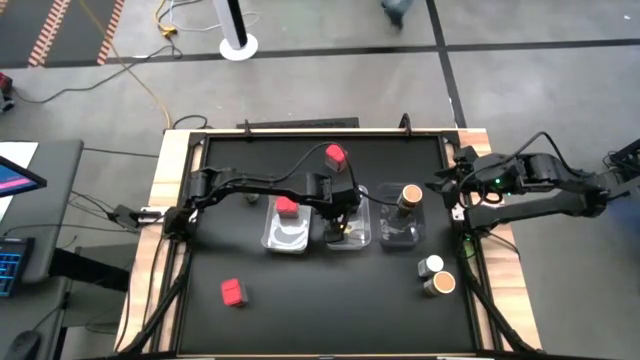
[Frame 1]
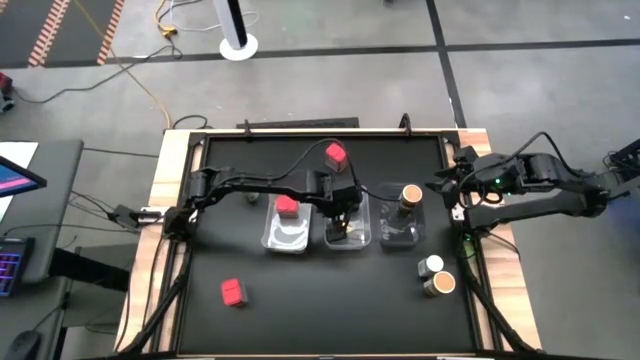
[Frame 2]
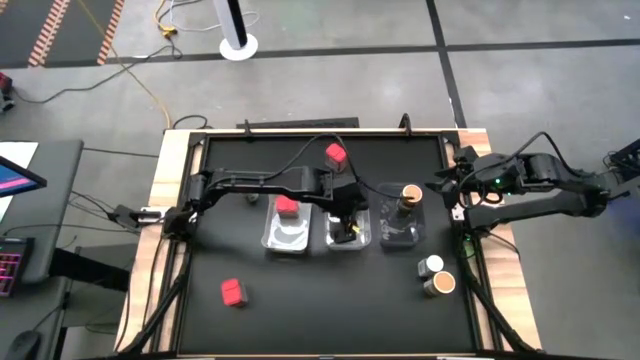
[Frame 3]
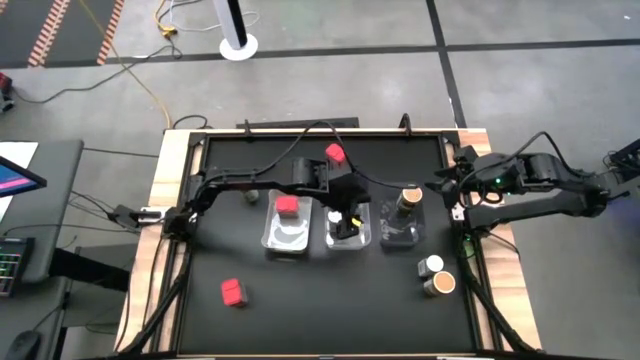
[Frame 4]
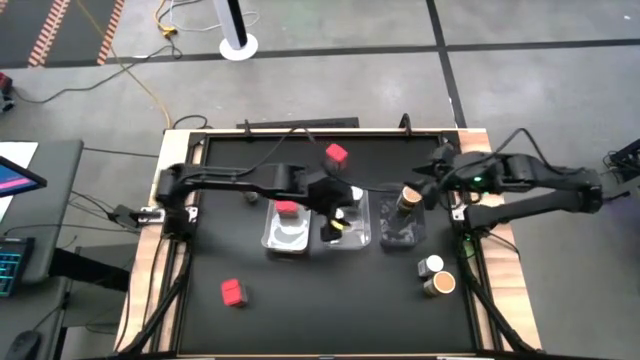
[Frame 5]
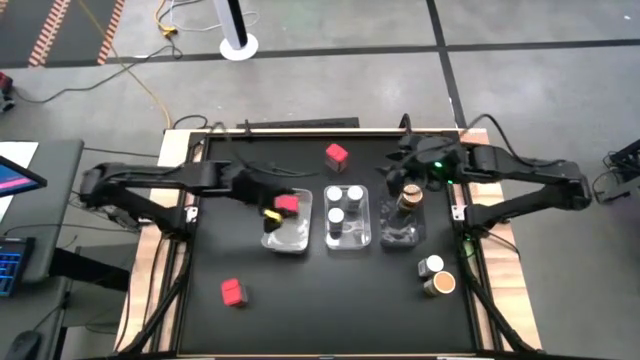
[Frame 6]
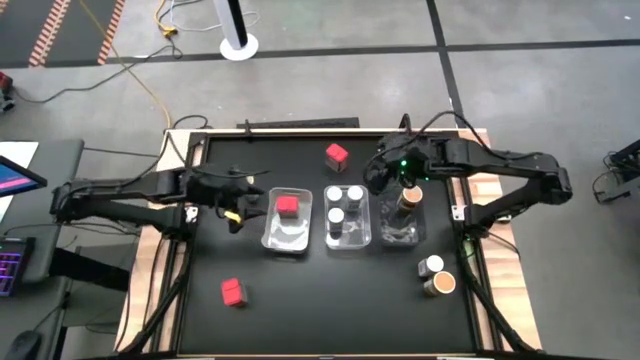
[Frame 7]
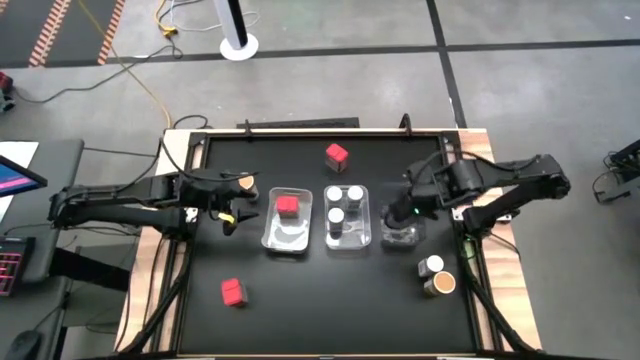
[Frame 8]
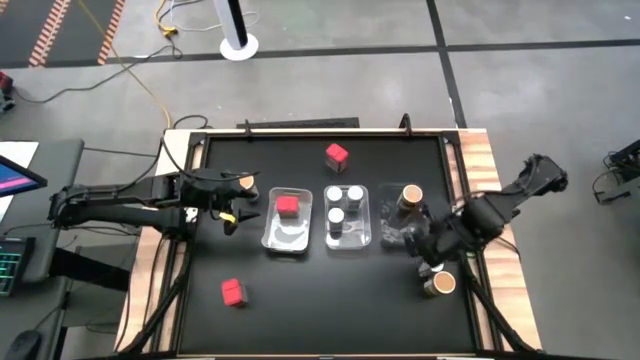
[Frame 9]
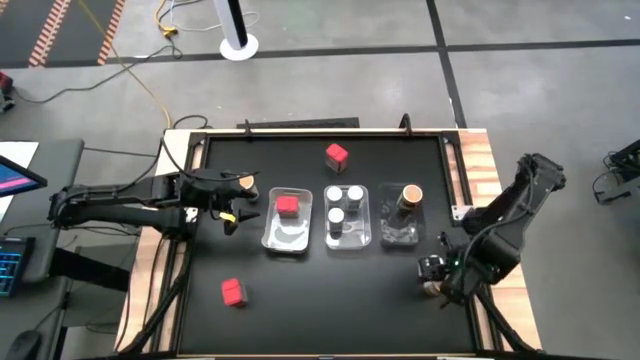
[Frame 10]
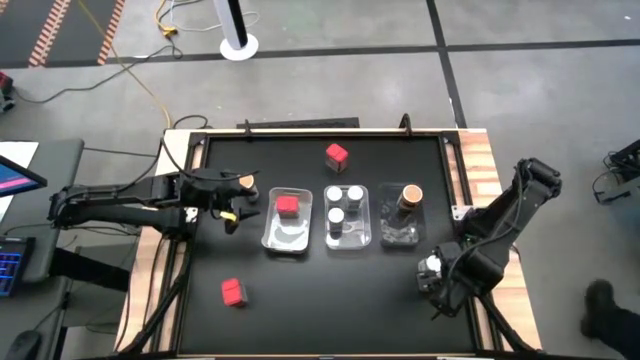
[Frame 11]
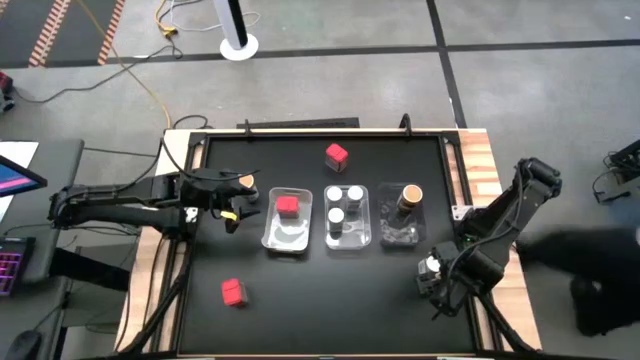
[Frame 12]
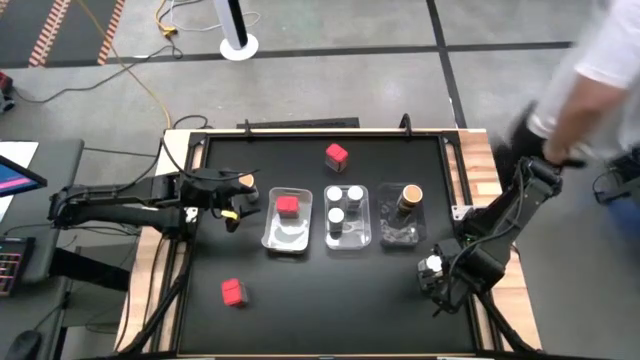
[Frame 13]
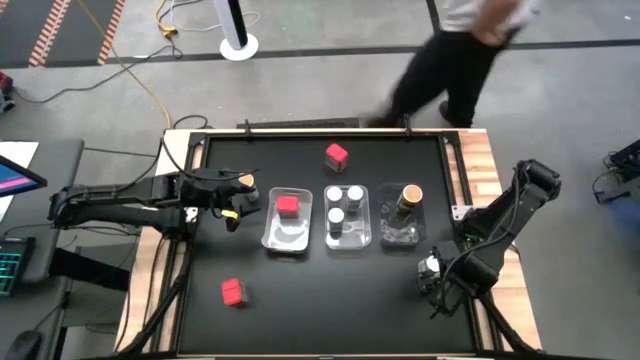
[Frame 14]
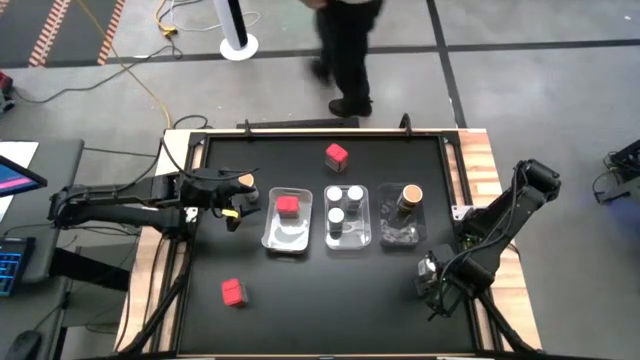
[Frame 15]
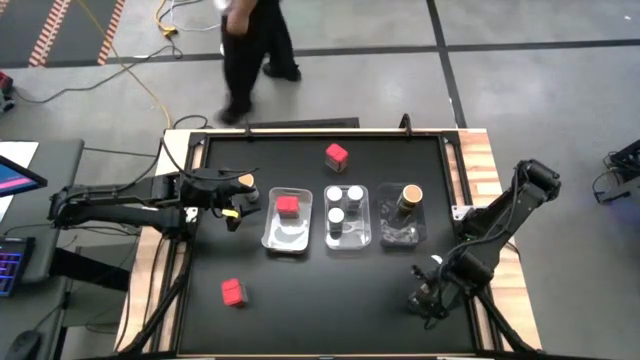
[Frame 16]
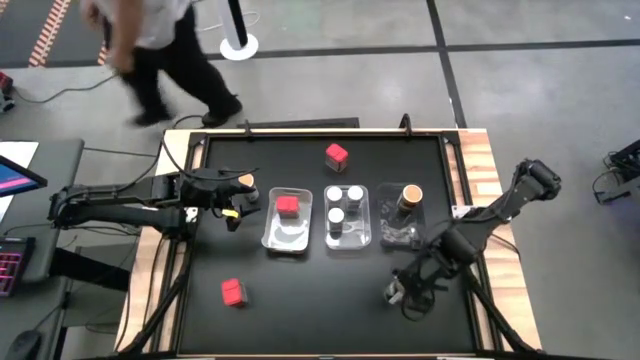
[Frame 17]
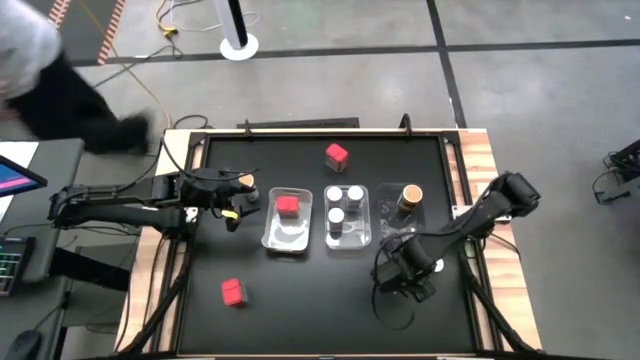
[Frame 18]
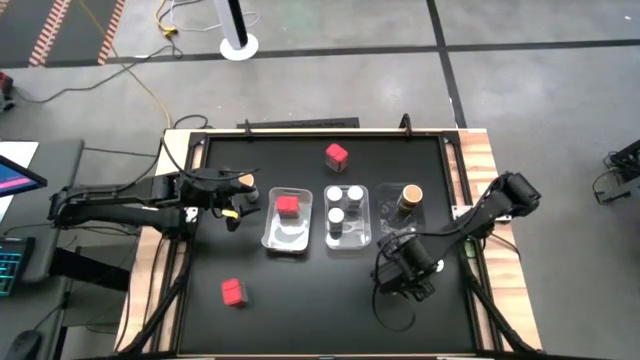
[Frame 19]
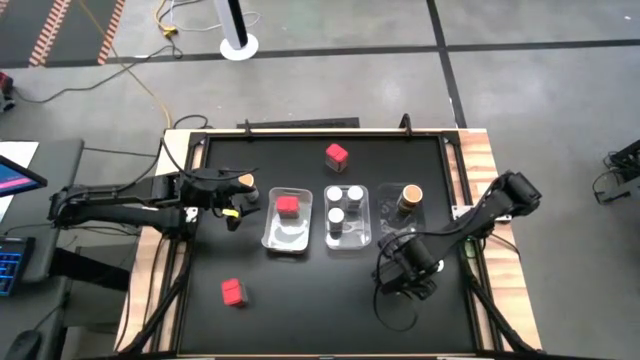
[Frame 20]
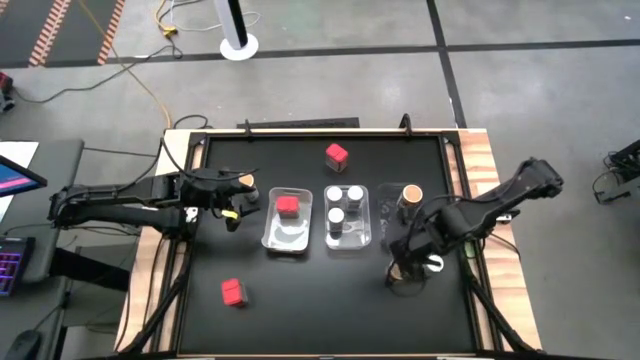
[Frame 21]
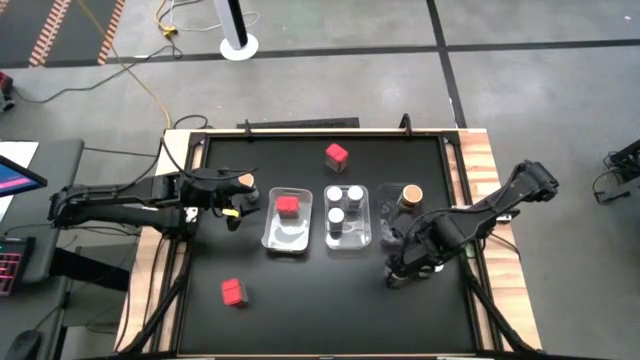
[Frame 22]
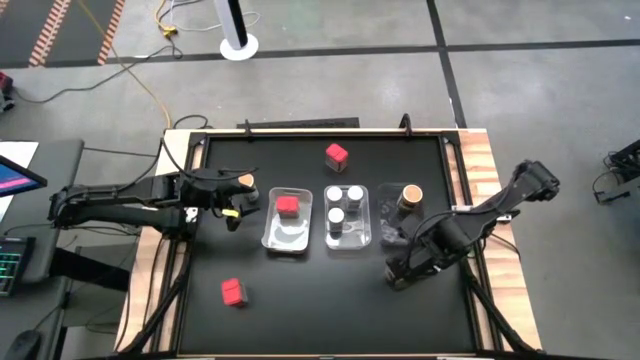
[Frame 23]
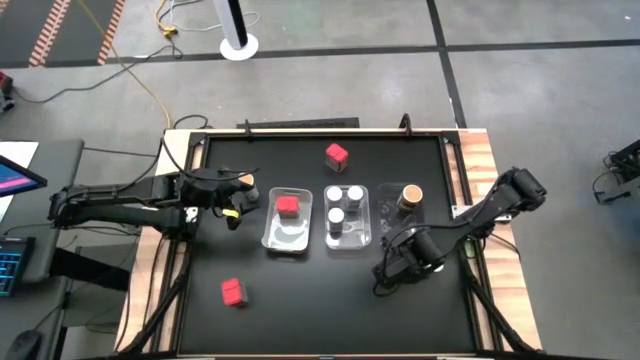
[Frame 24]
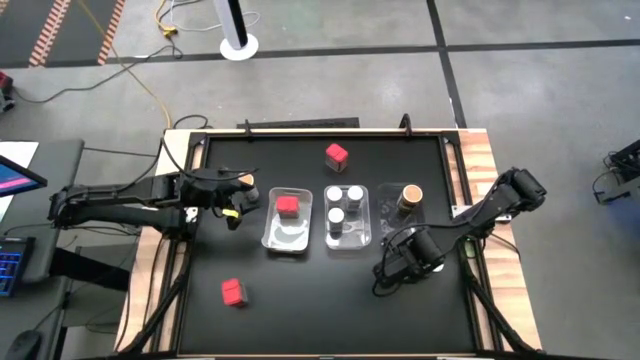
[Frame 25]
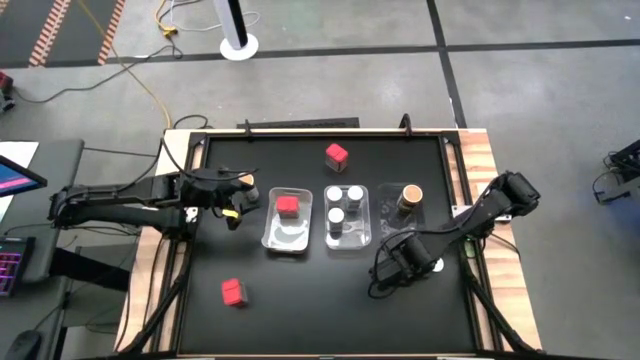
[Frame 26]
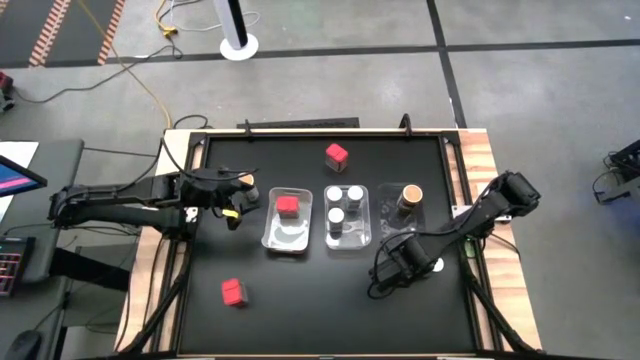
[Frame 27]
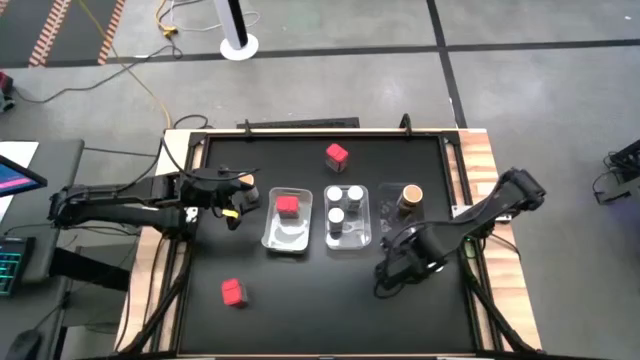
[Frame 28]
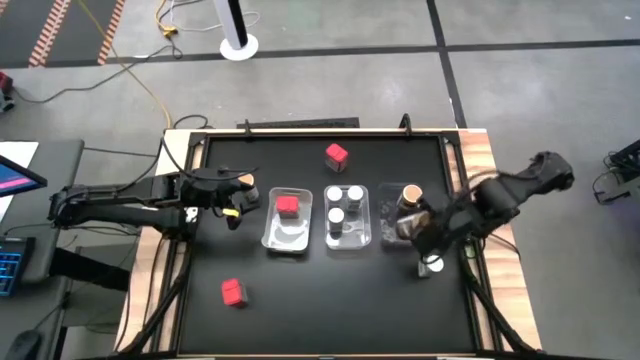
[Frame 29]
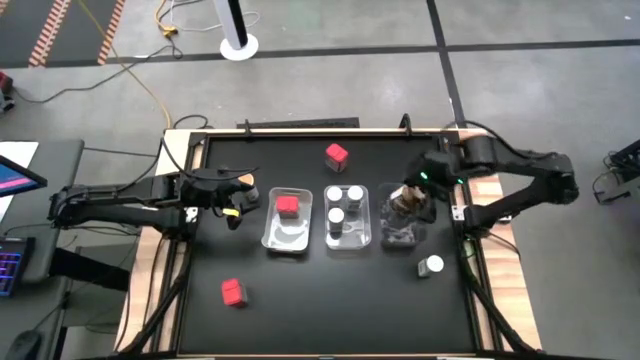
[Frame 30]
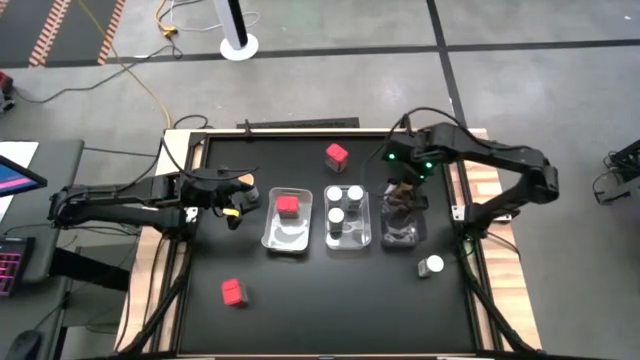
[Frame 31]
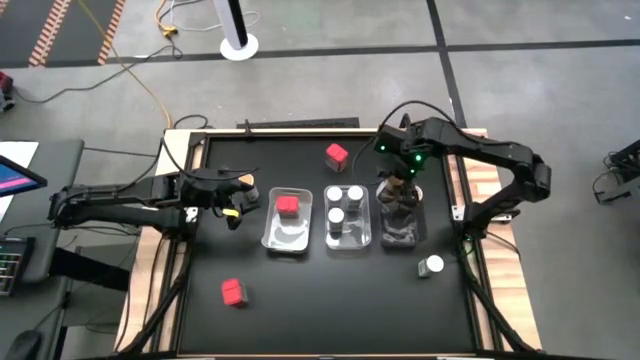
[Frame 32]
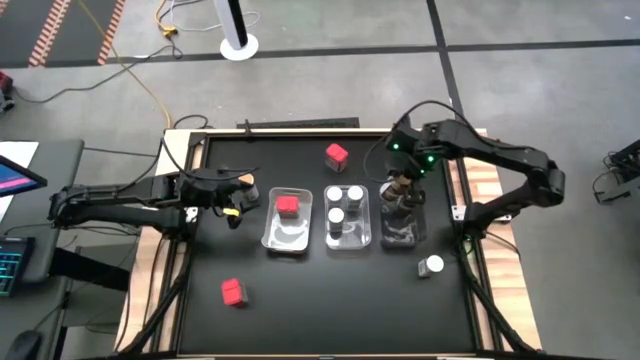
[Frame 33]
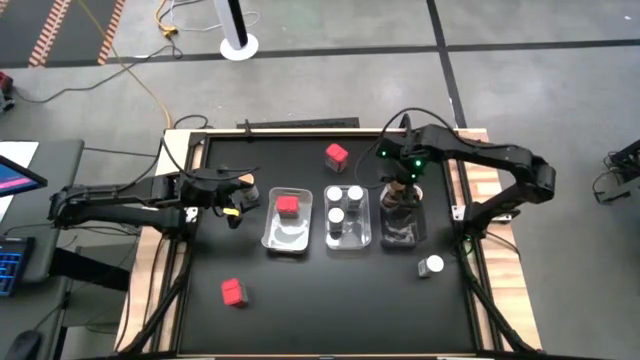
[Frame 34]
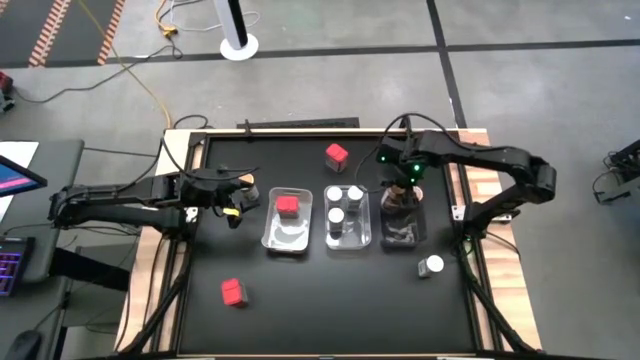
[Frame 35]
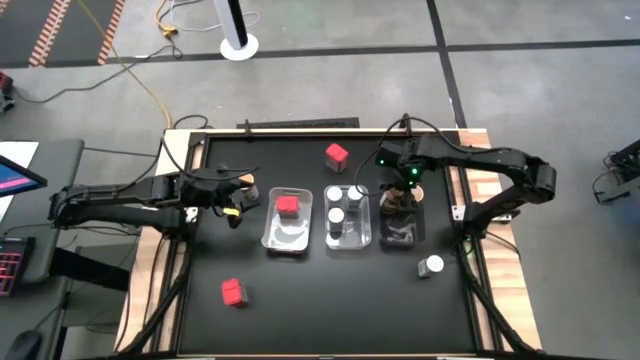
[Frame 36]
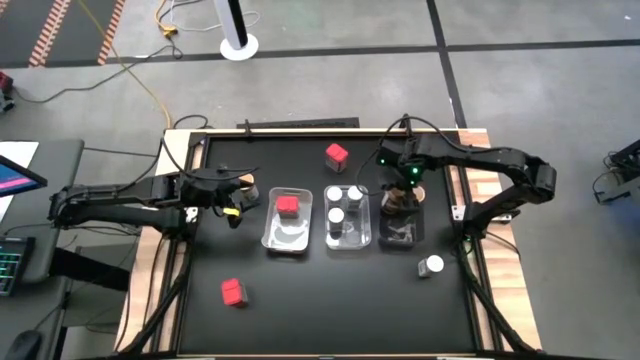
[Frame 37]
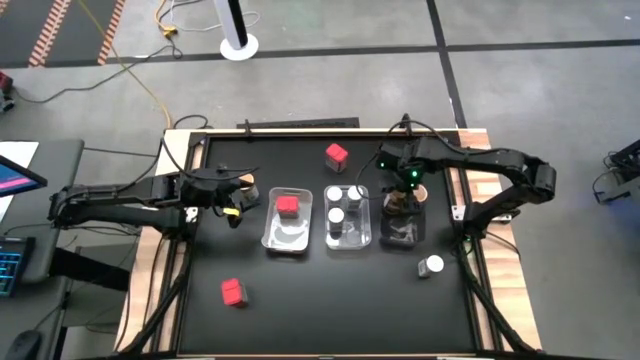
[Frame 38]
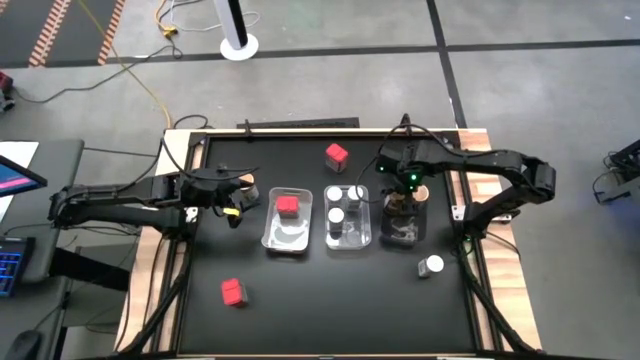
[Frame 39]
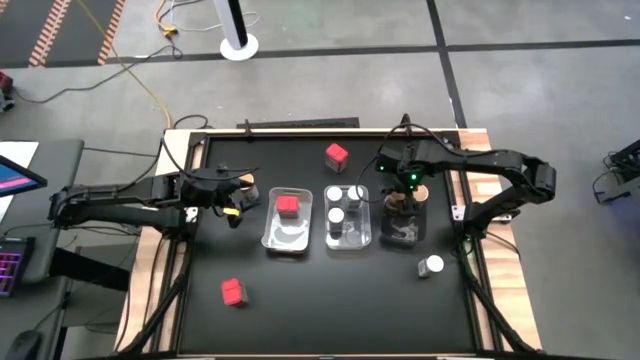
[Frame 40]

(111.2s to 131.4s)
Task: Sort spices by type
Put the bottom brown seasoning bottle into the black bin

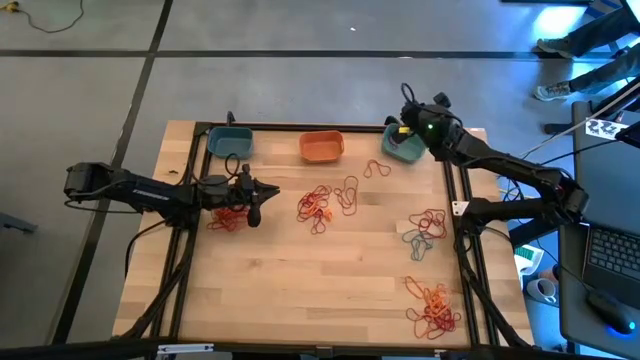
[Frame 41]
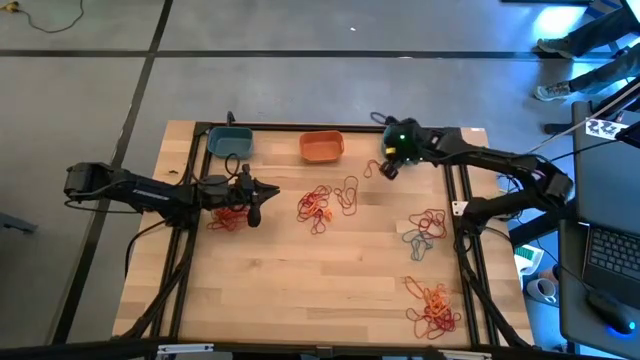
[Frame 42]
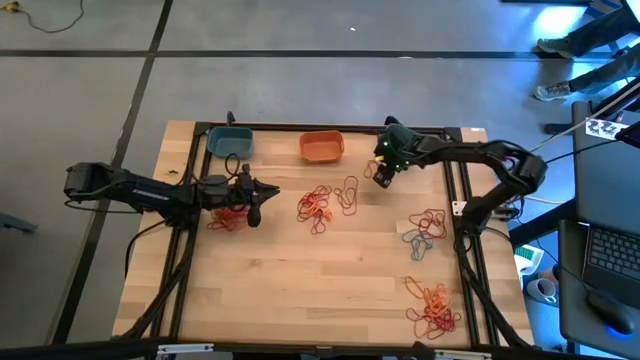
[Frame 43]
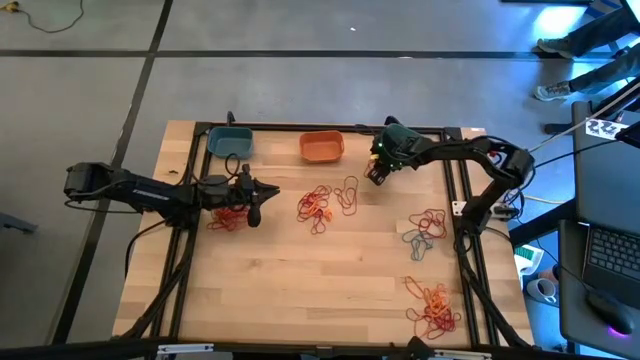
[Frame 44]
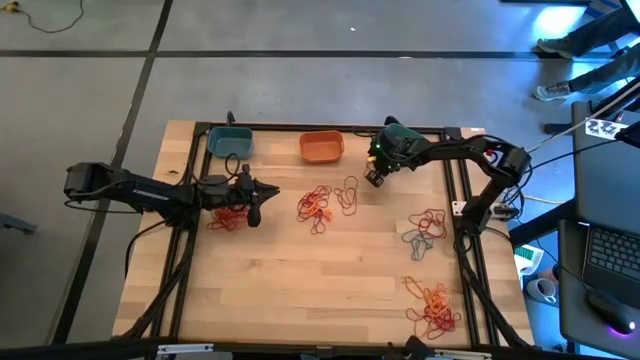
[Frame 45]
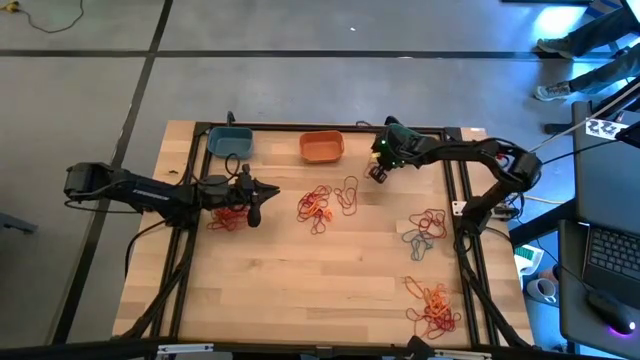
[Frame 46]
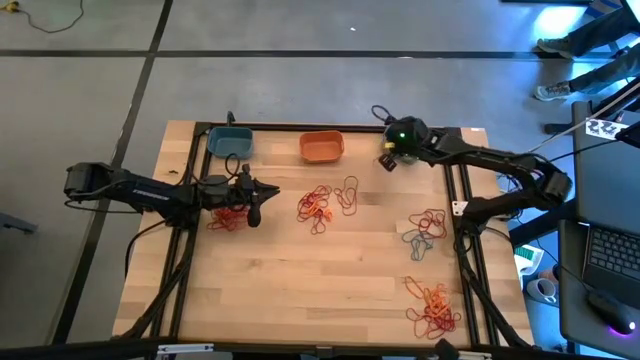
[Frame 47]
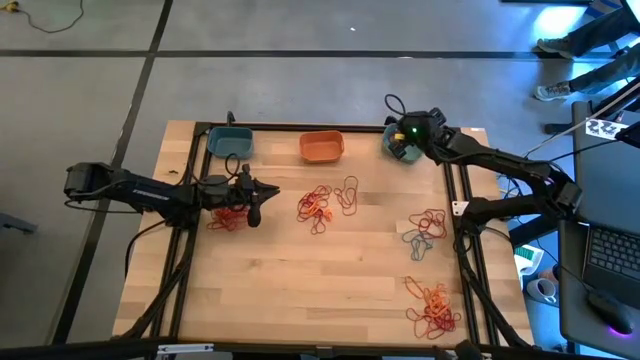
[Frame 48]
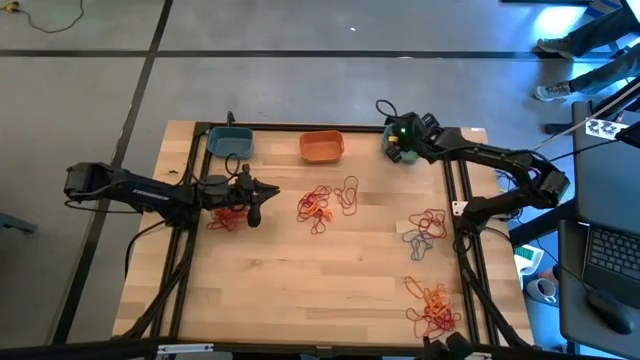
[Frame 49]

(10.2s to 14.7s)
Task: Sort rubber bands into baskets
Put the red rubber band into the green bin
